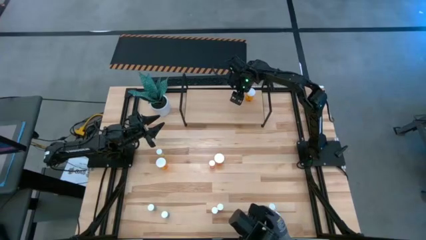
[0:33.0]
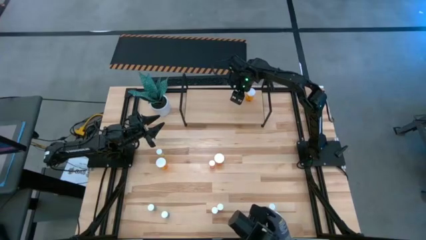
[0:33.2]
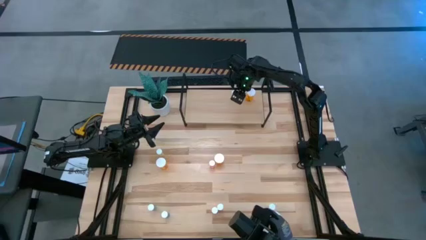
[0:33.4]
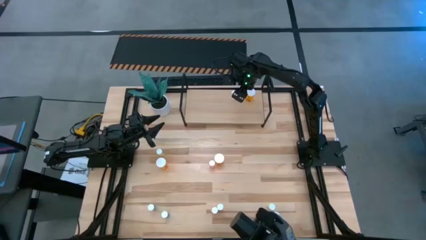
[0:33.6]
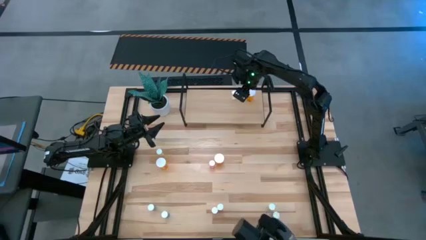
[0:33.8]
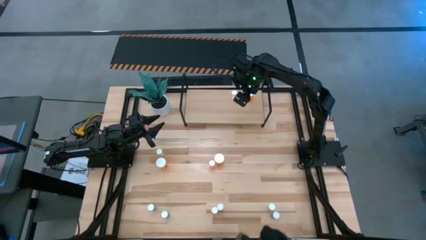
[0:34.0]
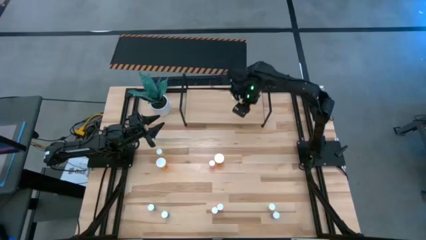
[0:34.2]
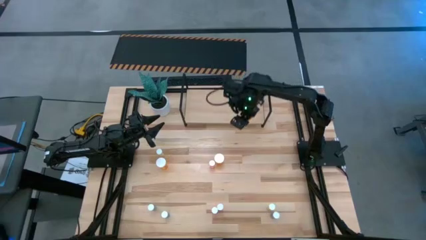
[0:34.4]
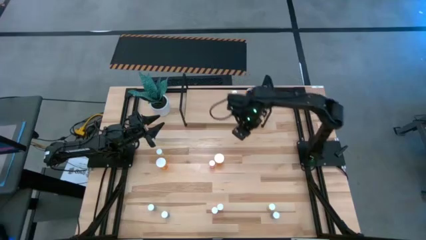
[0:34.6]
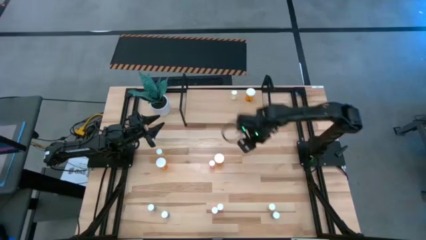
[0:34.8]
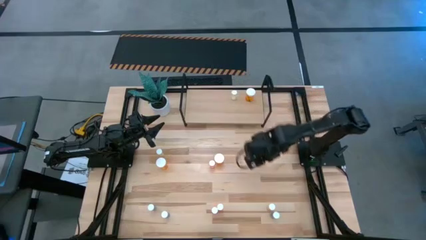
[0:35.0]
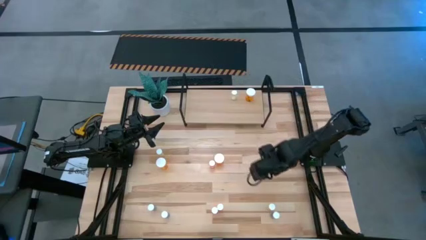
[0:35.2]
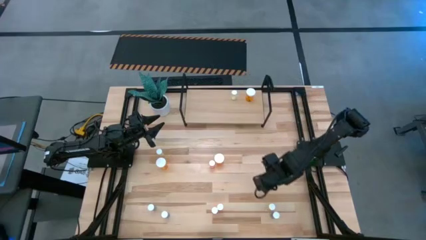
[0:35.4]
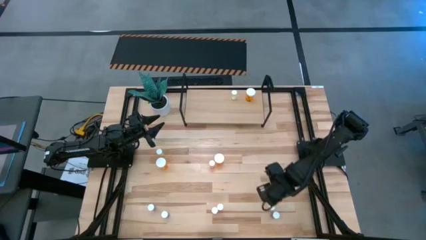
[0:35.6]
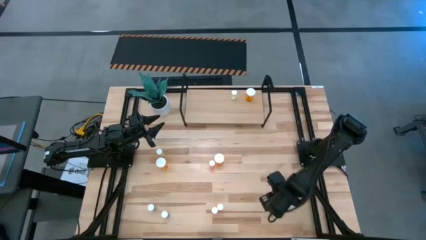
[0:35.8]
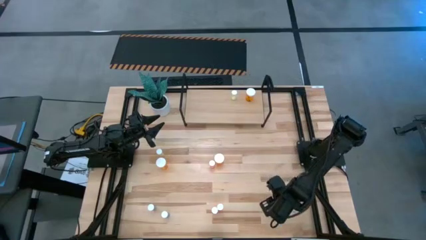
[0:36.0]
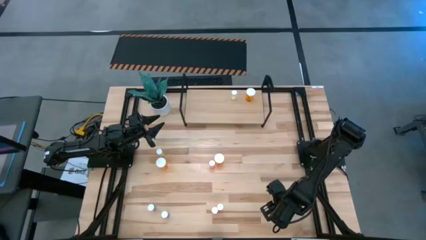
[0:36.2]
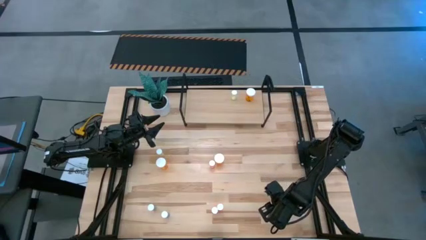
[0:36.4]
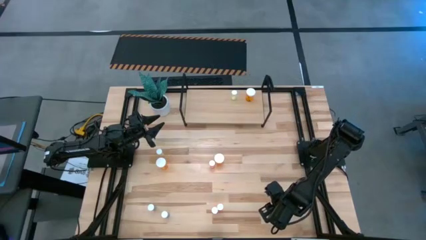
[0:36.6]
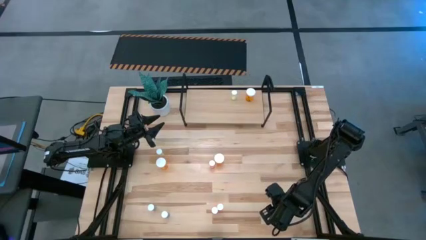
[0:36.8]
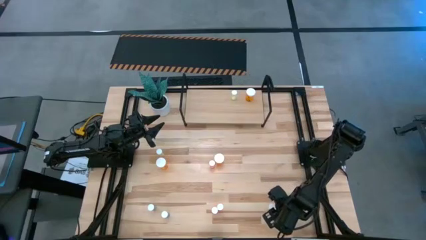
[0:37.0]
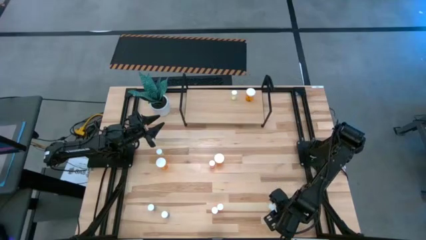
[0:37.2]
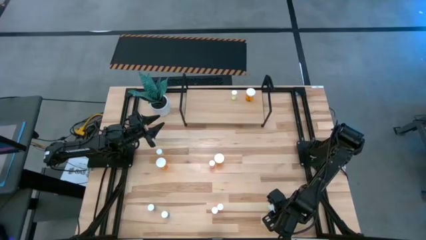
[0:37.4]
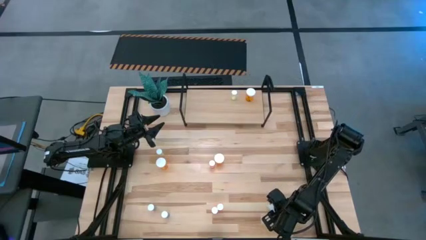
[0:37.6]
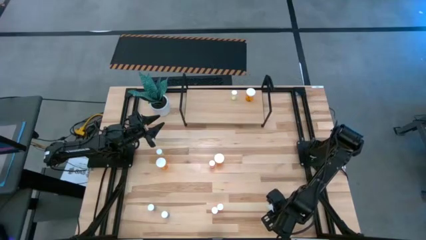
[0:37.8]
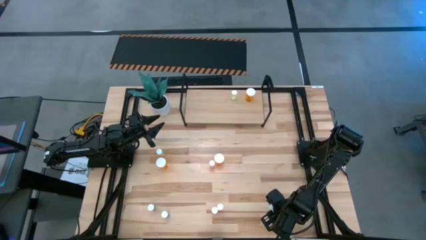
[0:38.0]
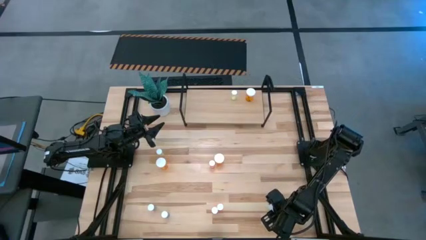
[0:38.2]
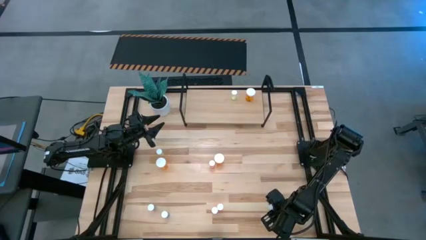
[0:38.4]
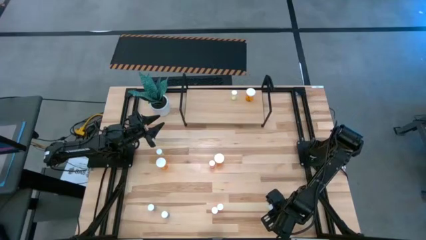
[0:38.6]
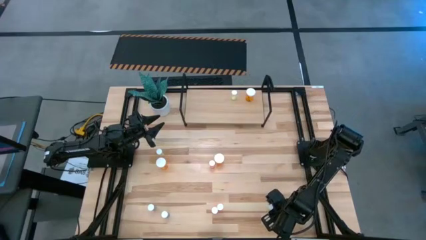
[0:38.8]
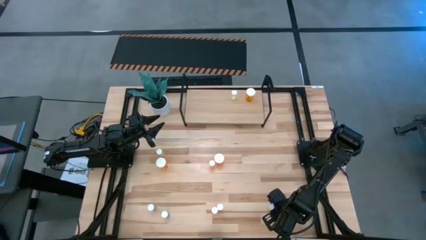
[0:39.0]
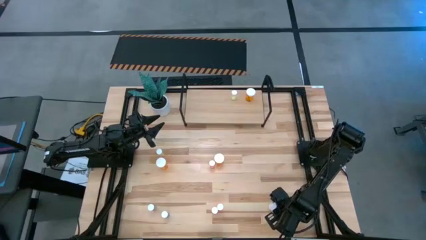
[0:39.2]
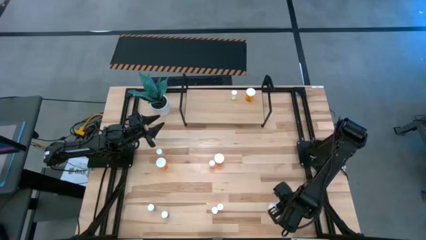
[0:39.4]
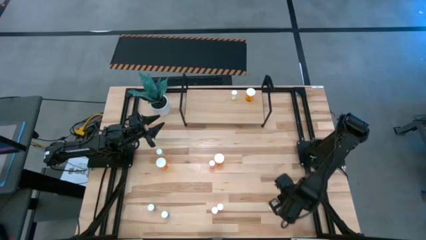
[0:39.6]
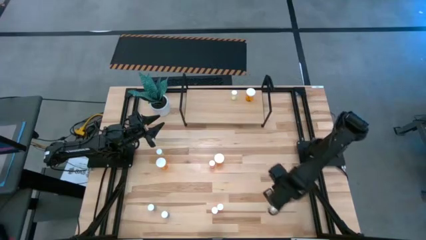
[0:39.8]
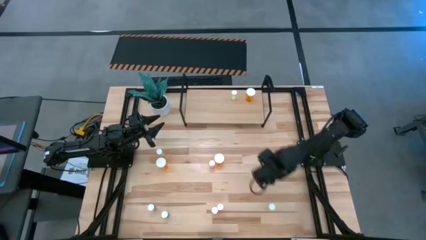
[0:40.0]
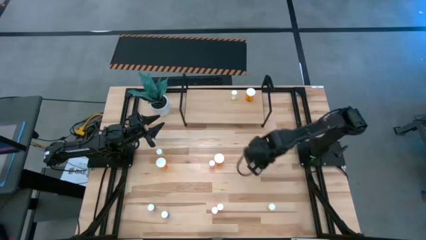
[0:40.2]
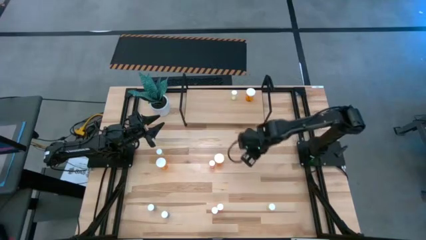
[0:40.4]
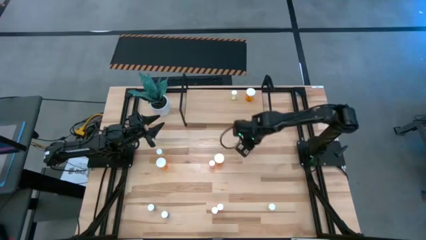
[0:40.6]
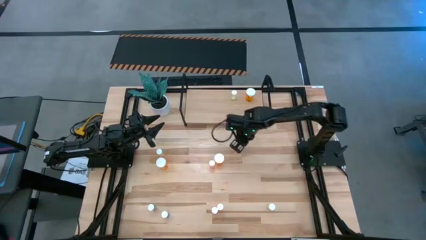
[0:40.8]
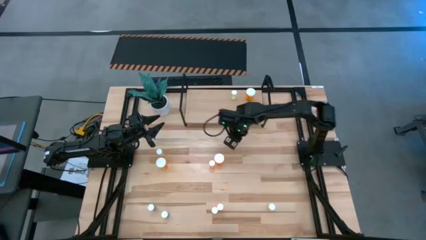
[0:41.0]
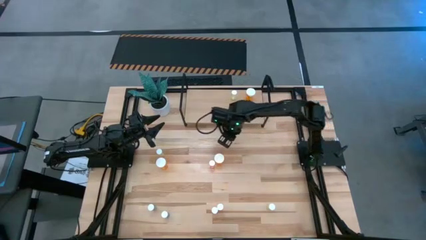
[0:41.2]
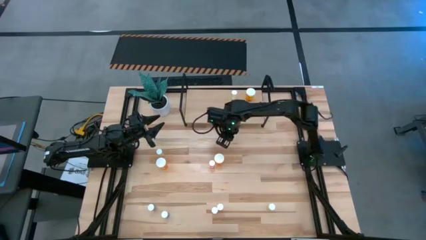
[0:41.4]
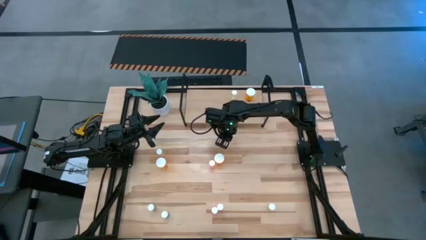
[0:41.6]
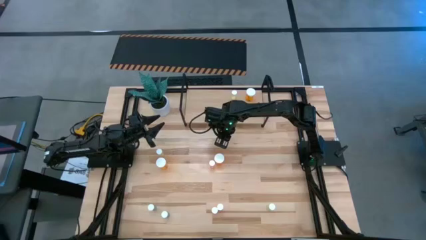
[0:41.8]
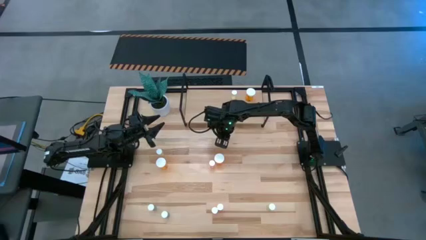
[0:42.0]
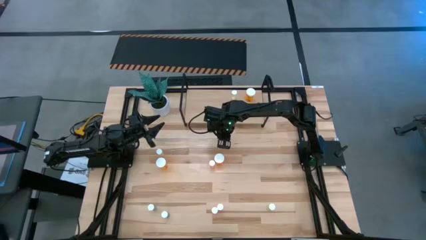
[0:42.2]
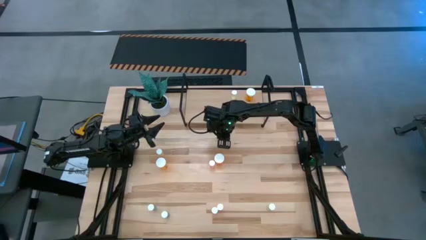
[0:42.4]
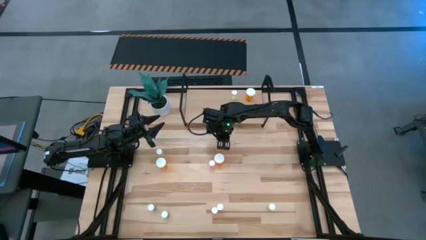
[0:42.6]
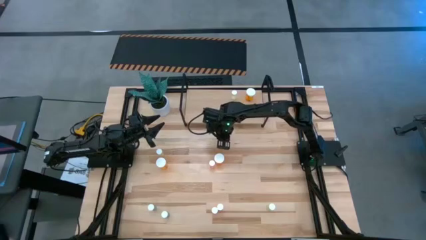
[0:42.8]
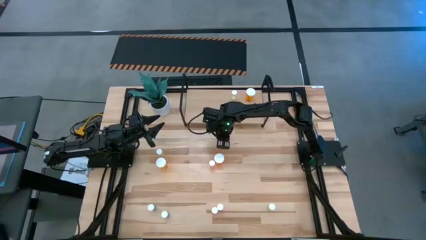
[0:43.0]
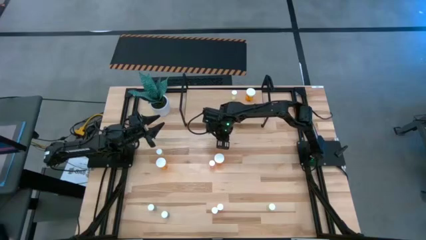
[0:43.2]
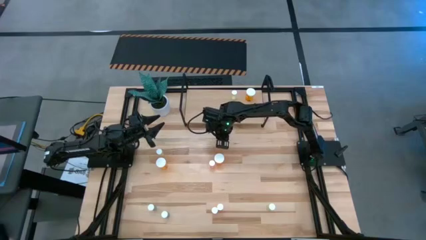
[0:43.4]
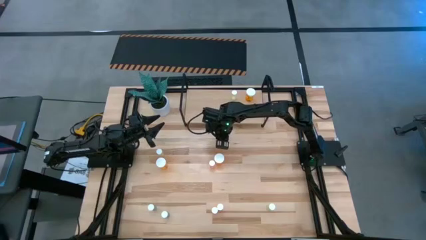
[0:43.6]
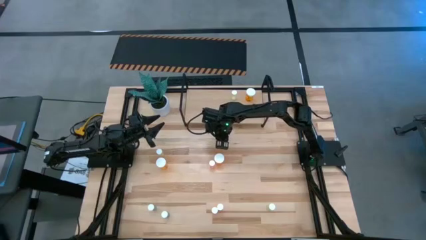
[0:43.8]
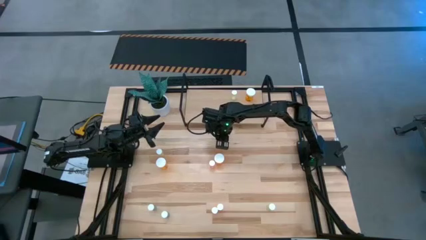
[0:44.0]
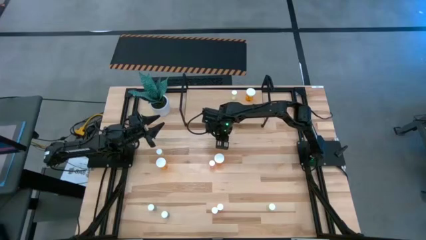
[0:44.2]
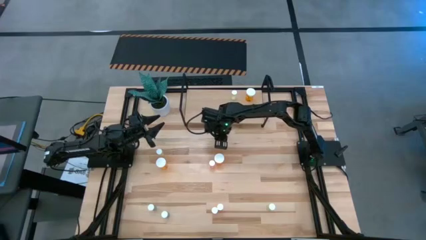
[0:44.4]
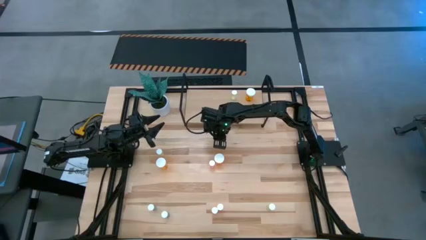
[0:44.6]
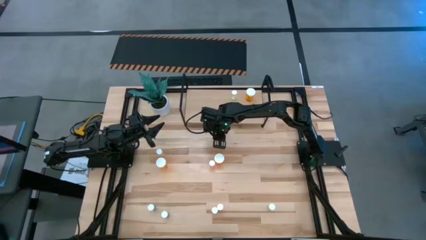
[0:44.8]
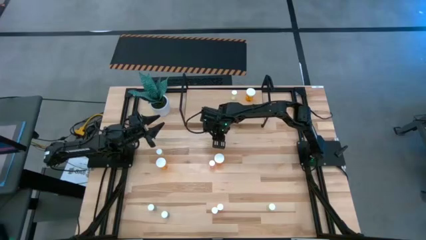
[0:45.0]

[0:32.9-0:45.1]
Task: Pick and place medicine bottles onto shelf by color
Move the blue pill bottle to the top of the table

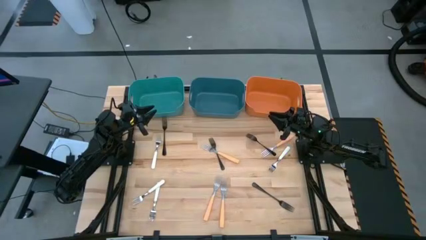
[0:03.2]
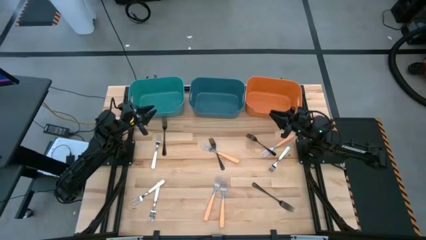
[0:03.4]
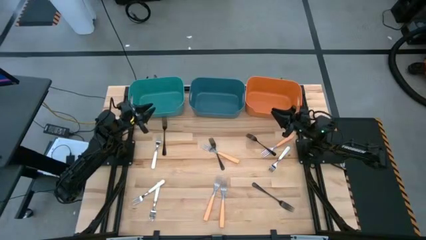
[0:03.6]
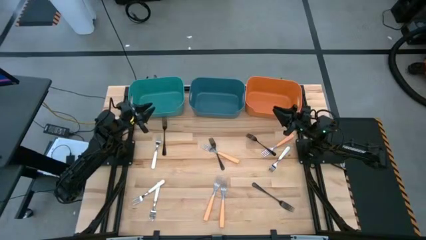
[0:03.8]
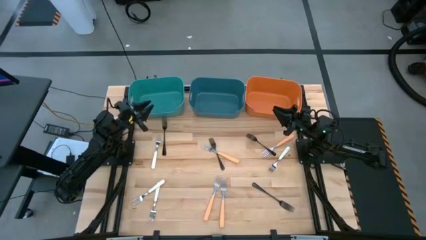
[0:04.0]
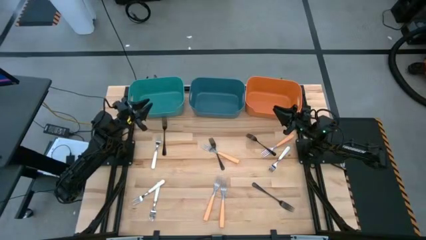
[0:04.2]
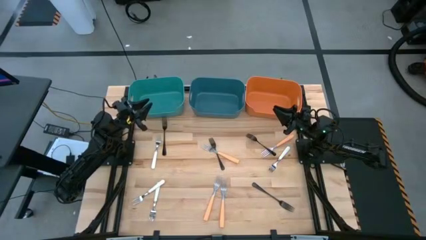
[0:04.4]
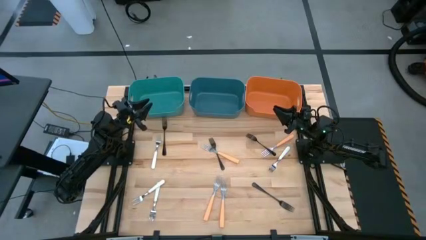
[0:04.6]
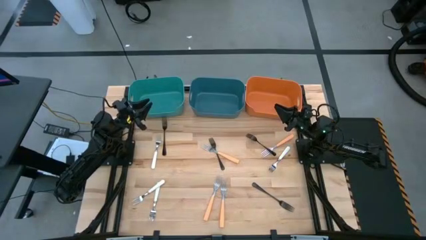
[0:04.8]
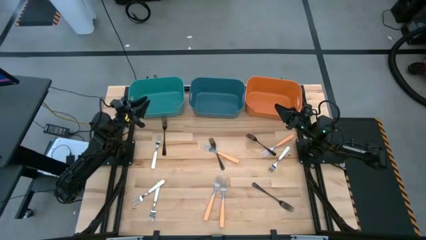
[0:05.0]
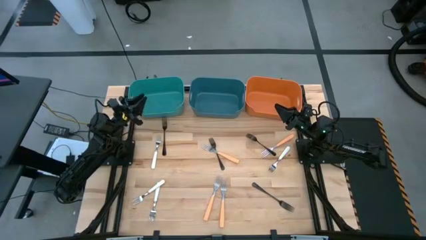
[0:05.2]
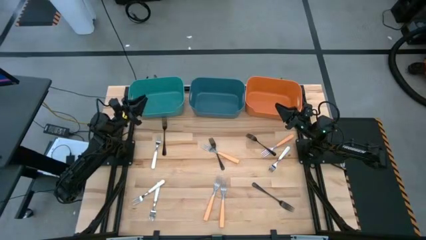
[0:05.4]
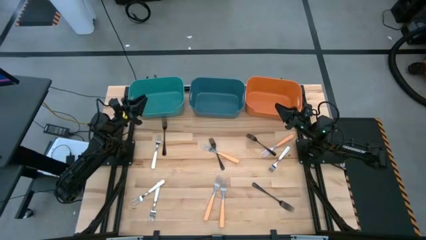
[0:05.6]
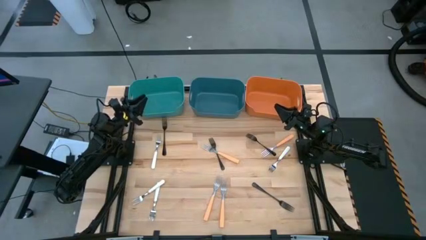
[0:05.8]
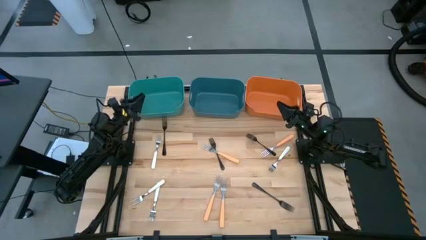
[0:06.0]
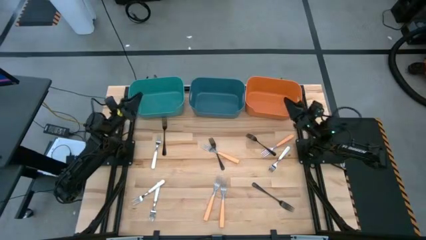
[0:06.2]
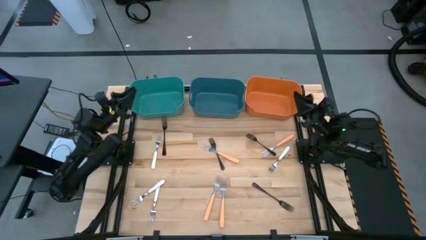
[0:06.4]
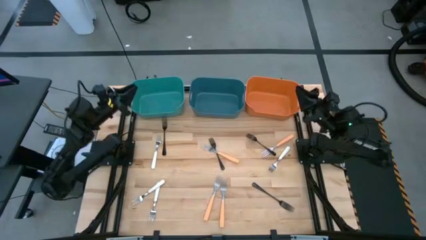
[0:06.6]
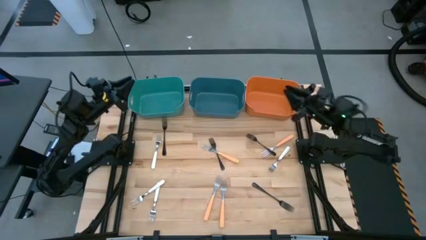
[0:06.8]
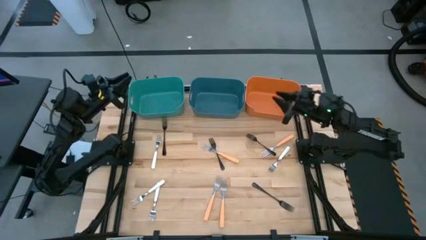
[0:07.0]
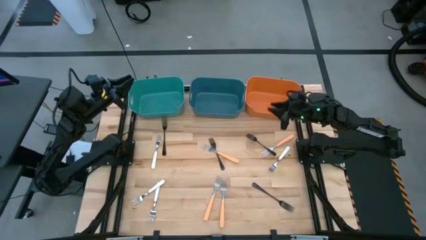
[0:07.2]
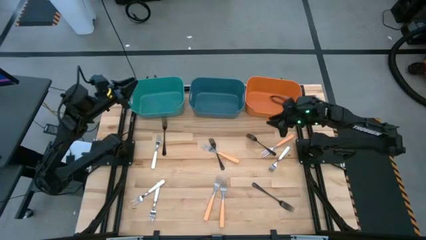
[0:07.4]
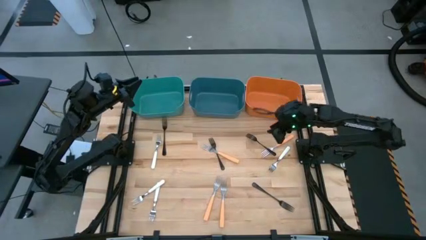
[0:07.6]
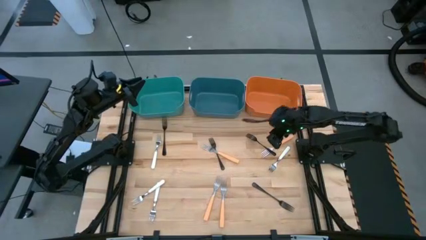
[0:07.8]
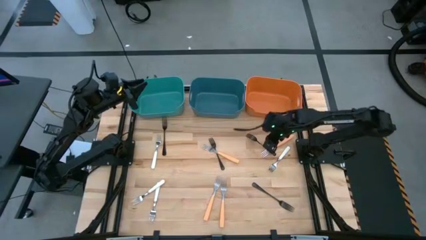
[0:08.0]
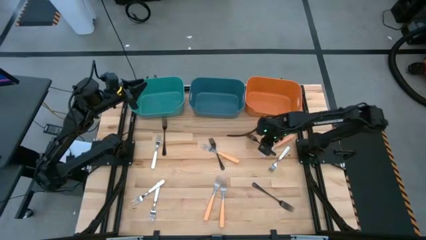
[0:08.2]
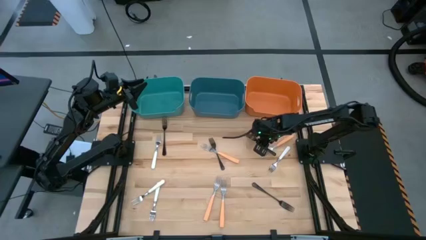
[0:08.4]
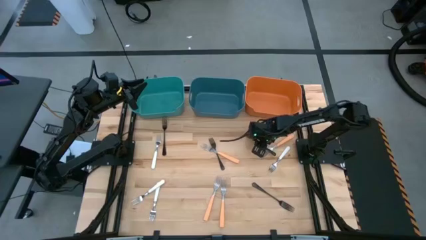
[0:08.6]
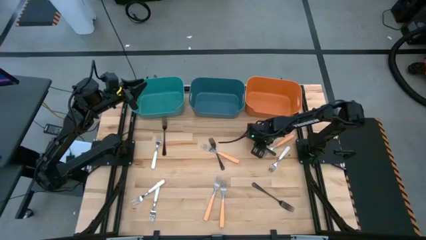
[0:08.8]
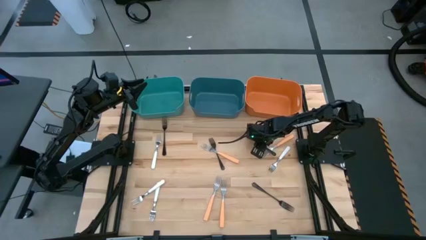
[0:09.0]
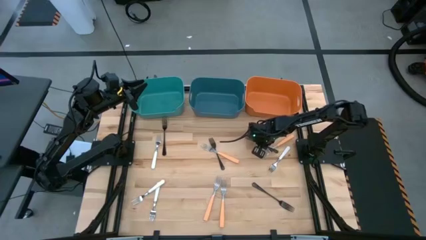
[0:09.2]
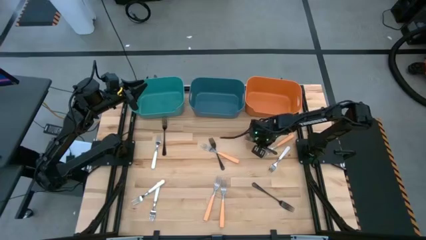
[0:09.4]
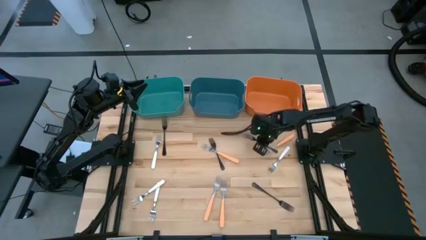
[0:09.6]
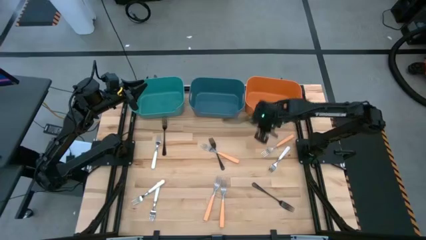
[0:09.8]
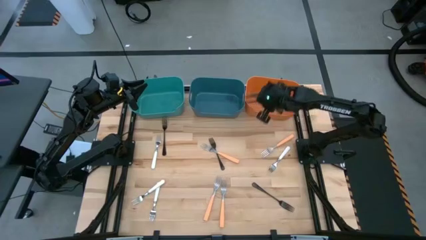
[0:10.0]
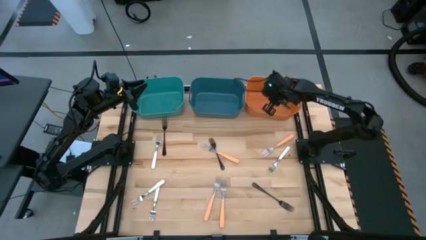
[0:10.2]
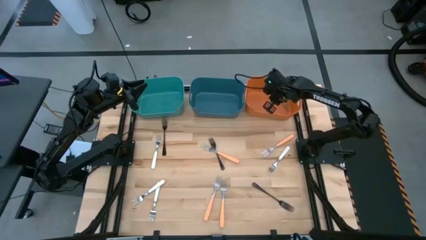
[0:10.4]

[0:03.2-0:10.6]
Task: Sort silverware by color (type)
Put the top right black fork into the orange bin
